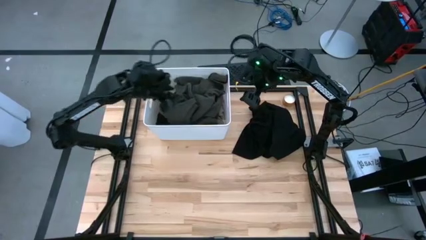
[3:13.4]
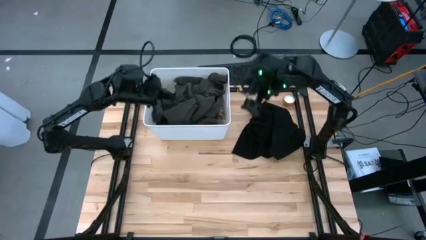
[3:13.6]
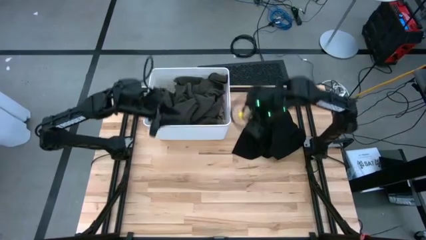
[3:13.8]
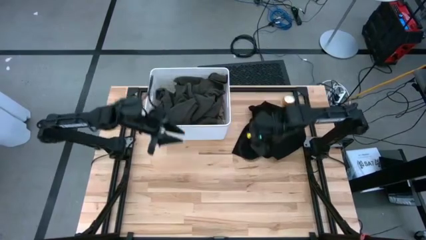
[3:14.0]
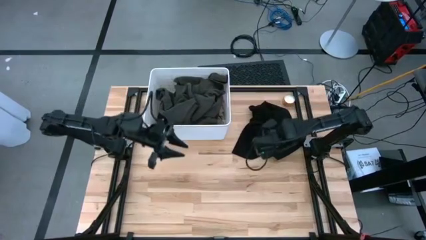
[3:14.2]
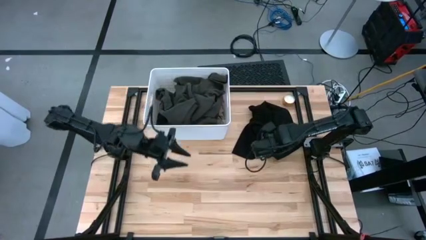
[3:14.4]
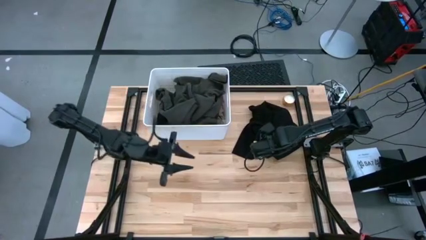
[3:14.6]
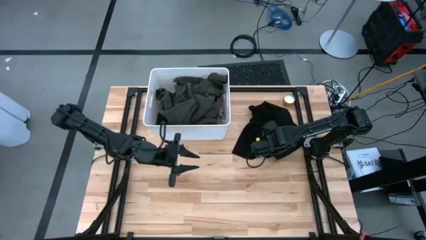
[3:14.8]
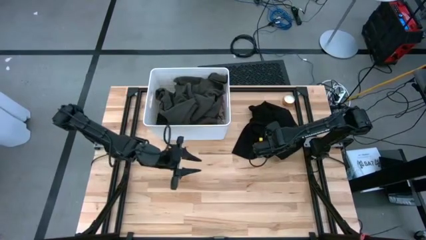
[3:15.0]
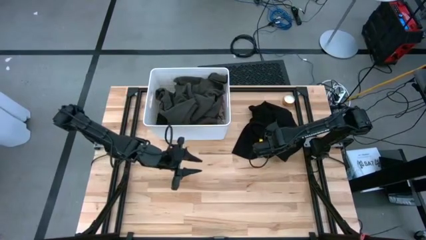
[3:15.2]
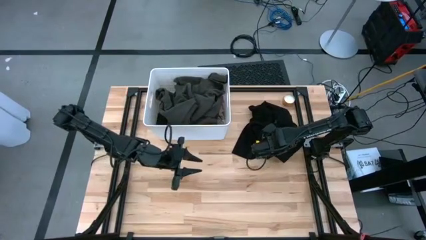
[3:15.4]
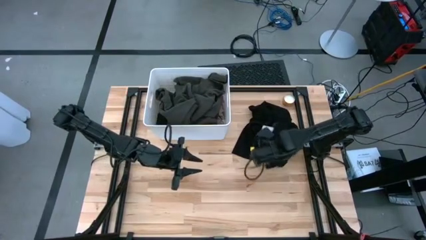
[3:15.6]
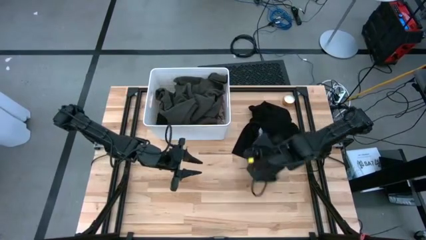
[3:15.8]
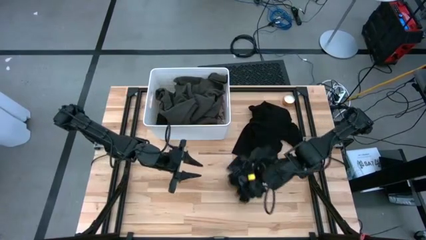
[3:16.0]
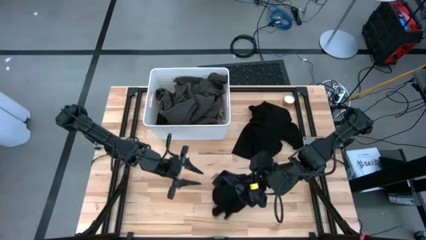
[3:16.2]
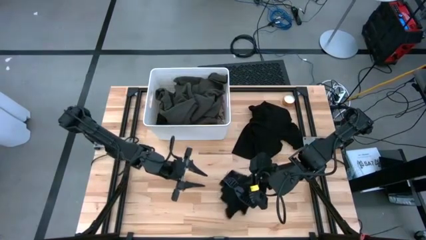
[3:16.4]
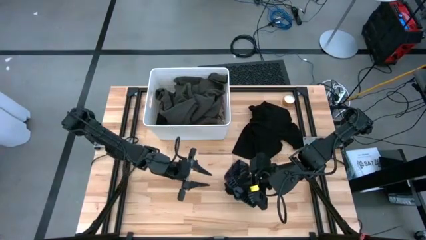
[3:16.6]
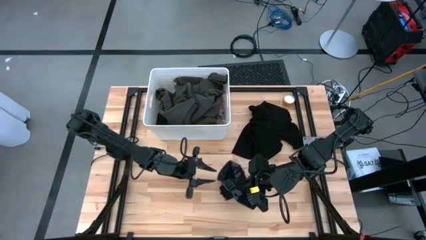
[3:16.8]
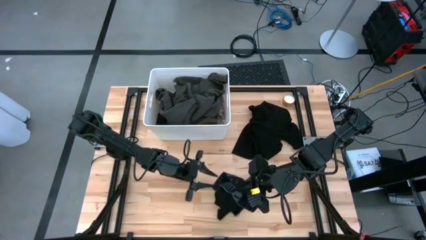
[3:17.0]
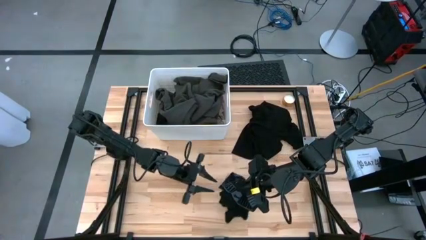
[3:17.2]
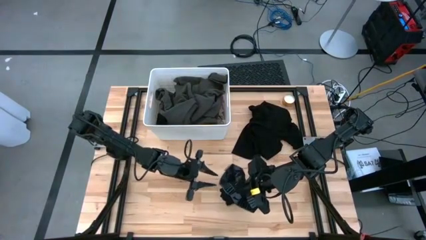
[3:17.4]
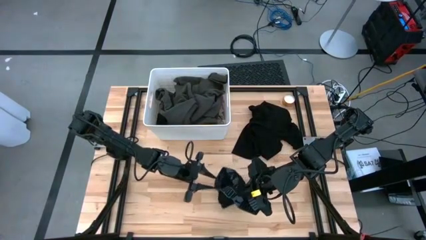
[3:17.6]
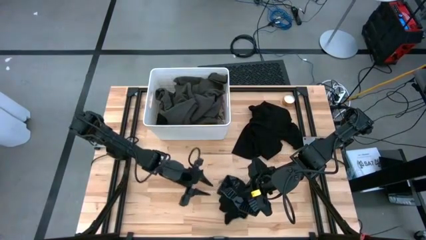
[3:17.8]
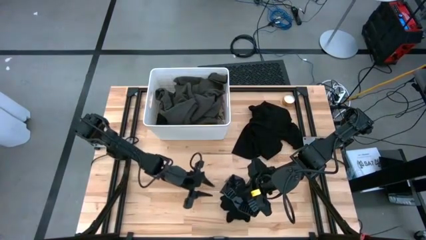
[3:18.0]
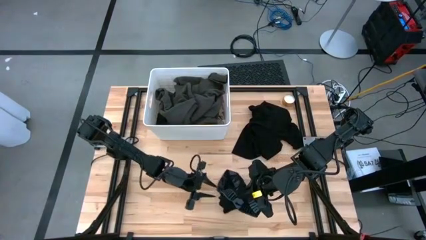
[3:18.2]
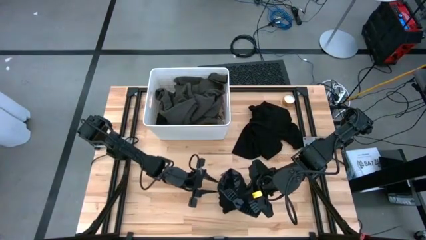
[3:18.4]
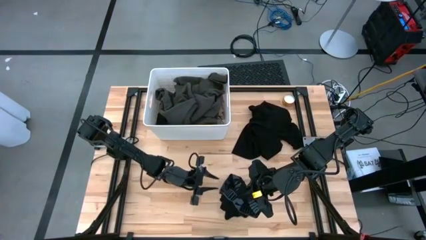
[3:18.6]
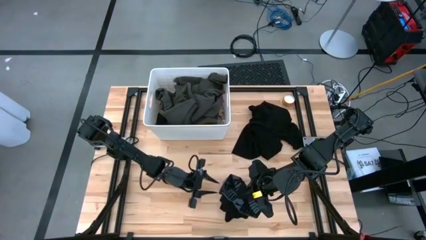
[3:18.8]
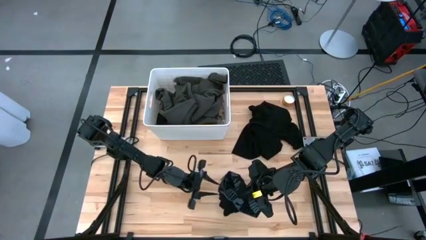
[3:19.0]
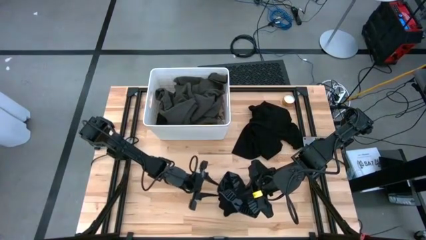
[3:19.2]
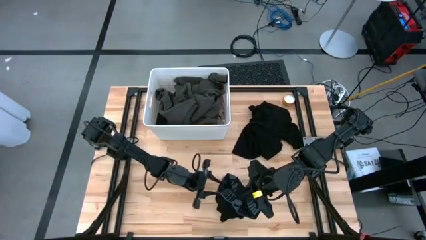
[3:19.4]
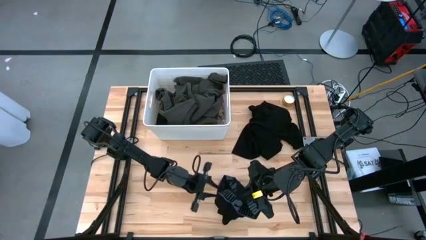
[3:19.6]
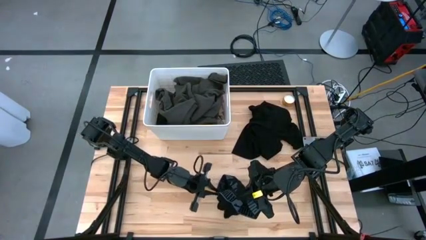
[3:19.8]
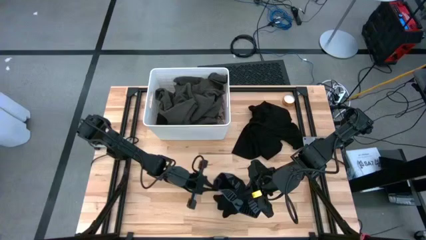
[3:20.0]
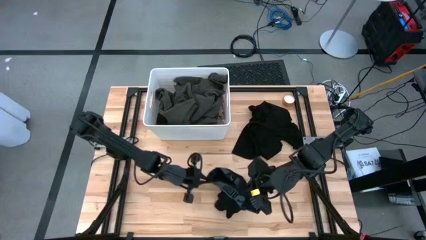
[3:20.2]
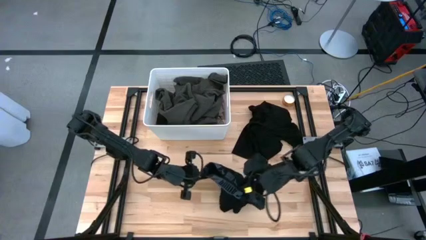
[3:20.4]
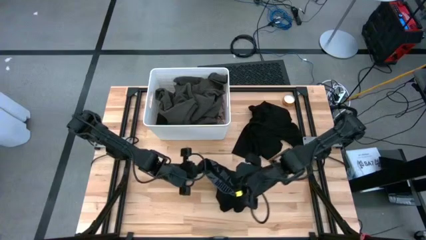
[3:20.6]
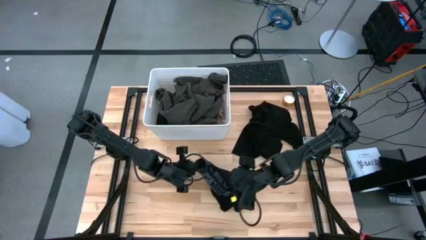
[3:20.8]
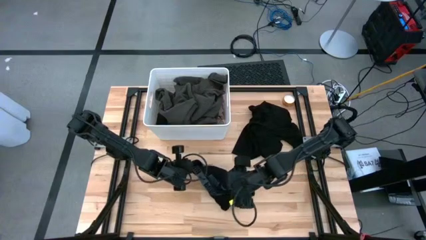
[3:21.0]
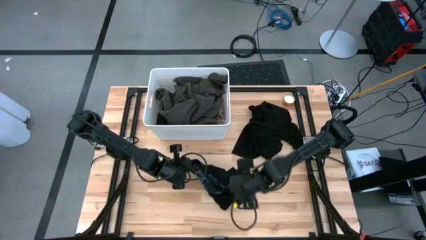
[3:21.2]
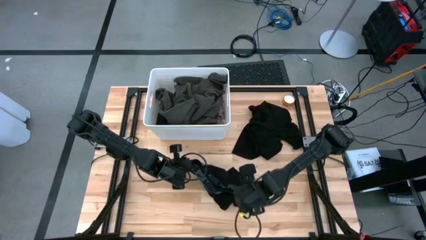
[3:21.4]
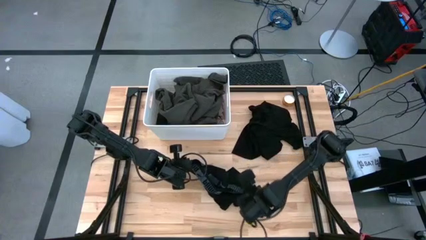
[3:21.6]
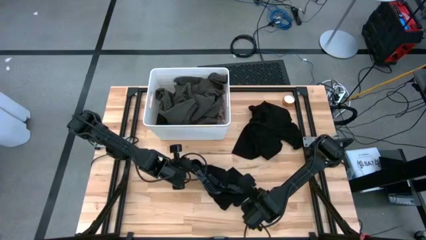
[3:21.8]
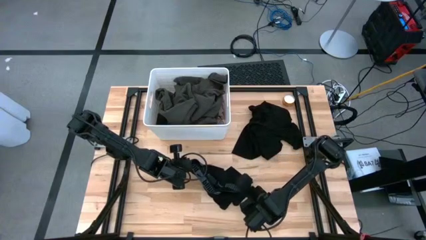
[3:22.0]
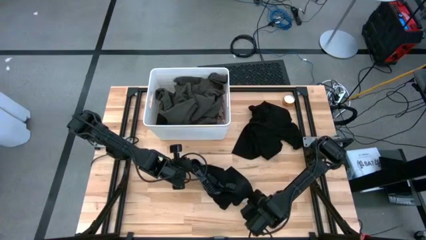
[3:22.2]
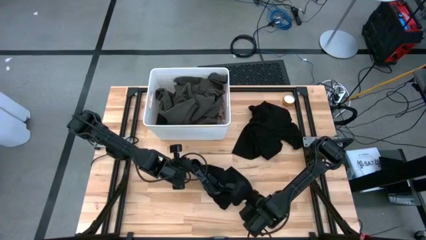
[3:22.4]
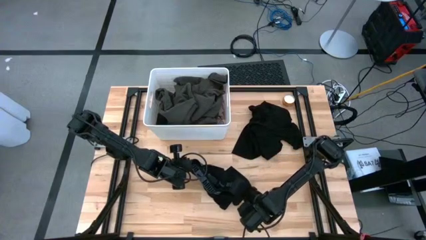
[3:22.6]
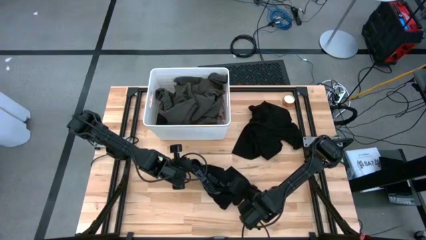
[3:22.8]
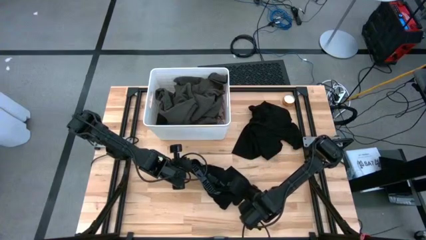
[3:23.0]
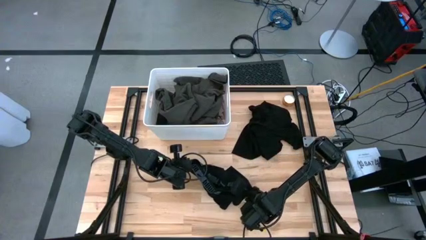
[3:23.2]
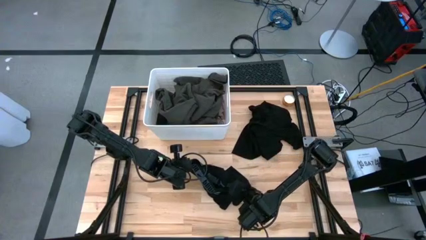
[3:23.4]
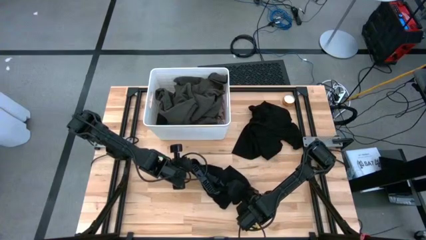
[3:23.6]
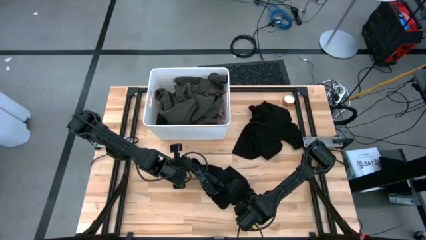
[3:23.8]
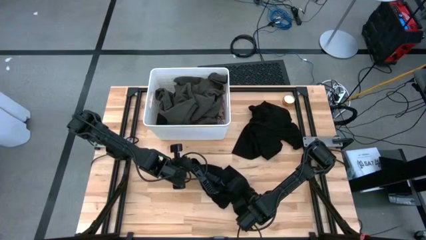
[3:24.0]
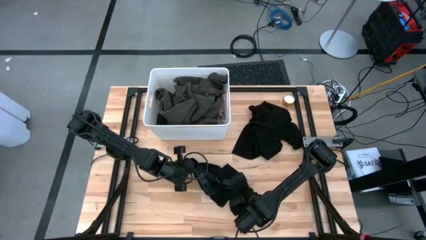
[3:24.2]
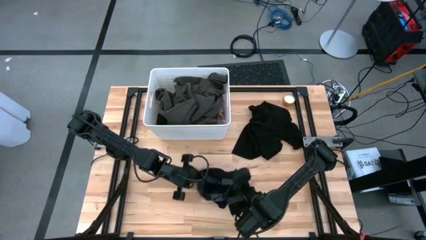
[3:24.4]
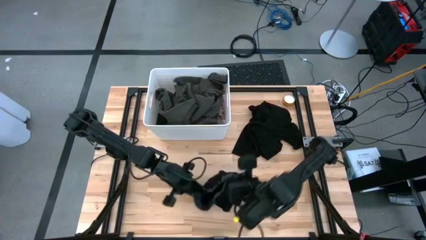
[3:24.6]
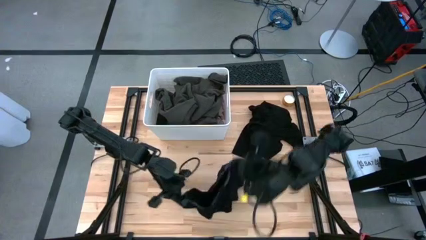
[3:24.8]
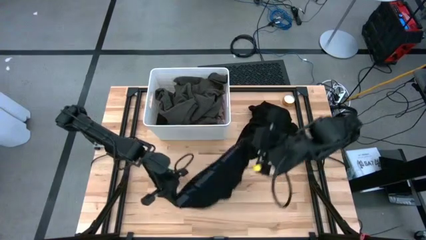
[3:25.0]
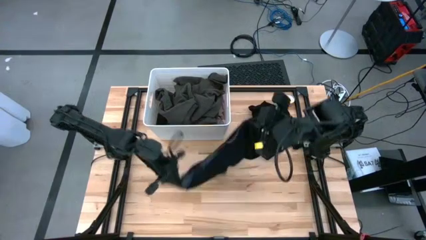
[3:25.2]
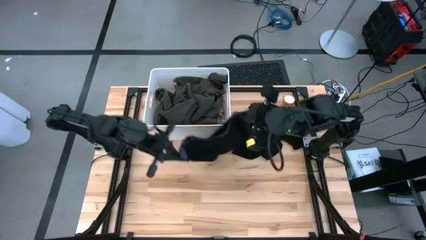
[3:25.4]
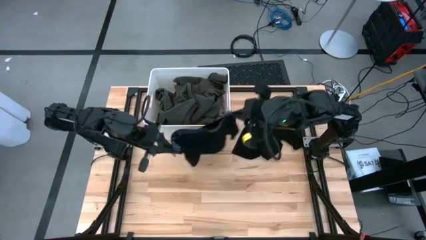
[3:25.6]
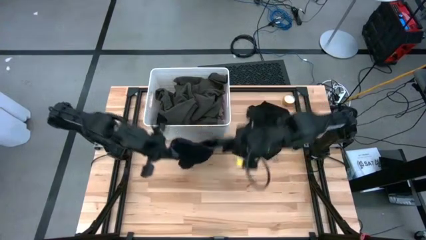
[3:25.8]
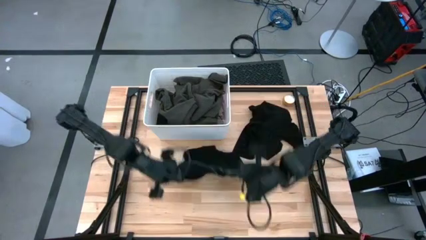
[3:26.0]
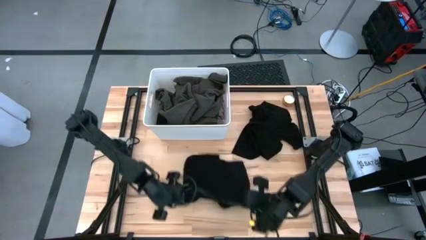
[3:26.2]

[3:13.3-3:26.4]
Task: Sort clothes
Put the black boxer into the white laundry bin

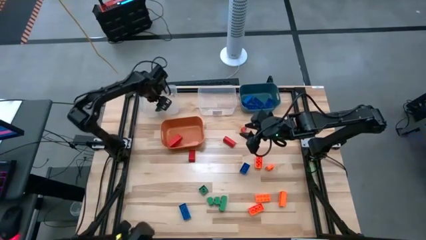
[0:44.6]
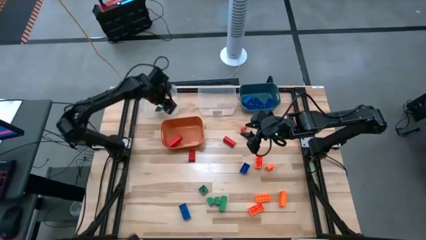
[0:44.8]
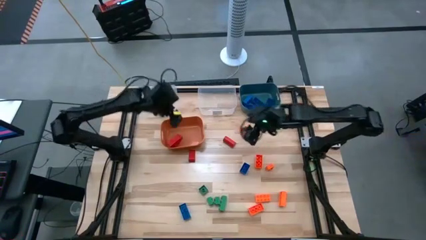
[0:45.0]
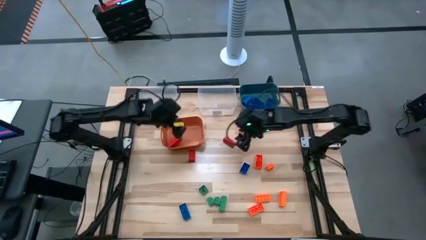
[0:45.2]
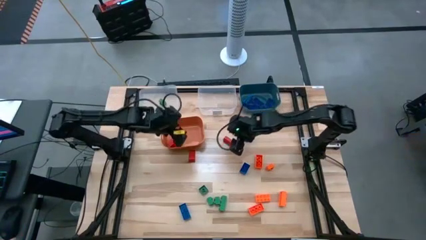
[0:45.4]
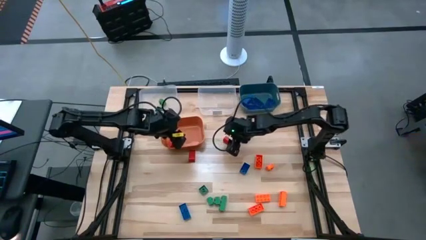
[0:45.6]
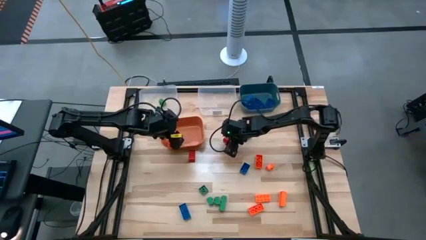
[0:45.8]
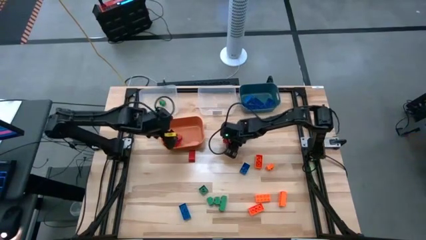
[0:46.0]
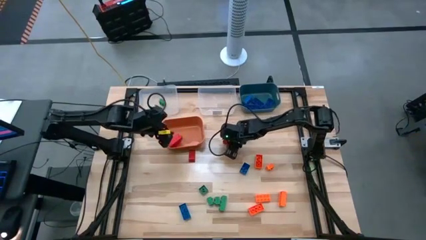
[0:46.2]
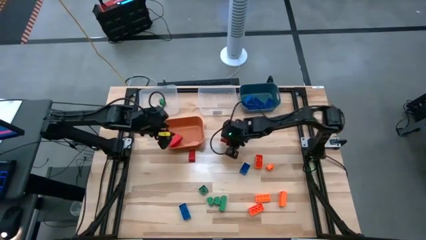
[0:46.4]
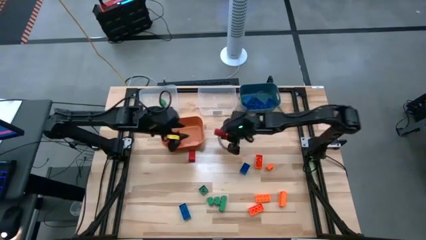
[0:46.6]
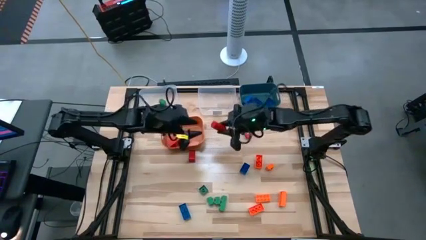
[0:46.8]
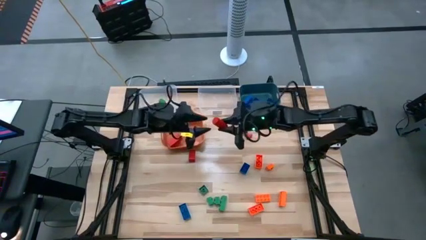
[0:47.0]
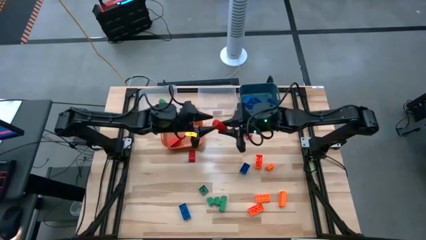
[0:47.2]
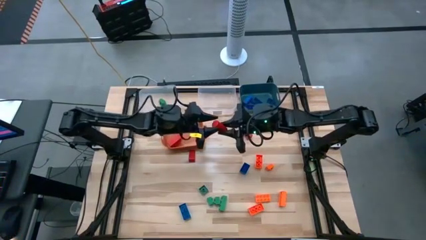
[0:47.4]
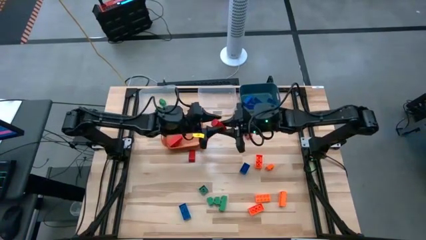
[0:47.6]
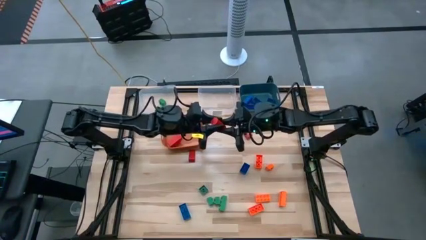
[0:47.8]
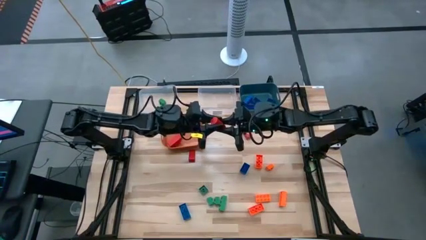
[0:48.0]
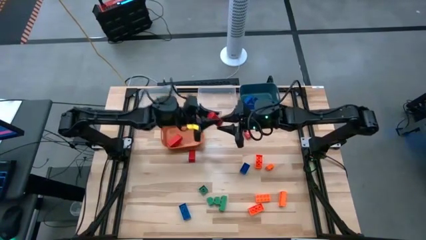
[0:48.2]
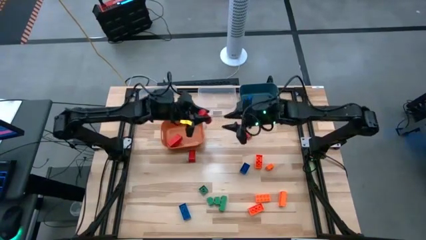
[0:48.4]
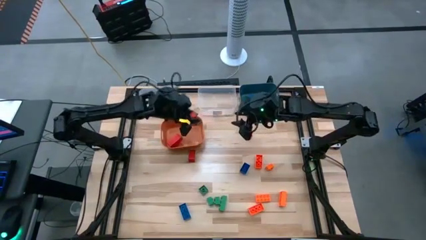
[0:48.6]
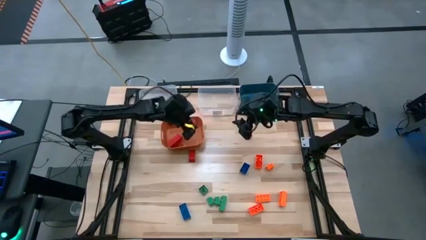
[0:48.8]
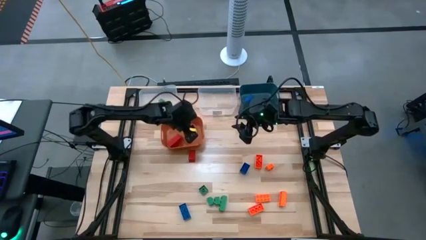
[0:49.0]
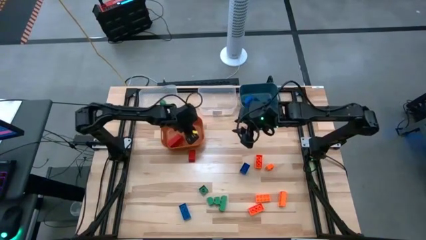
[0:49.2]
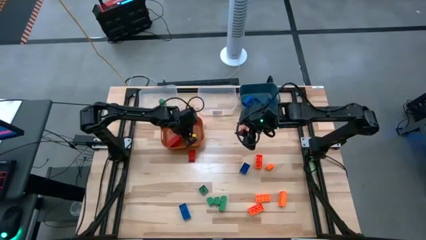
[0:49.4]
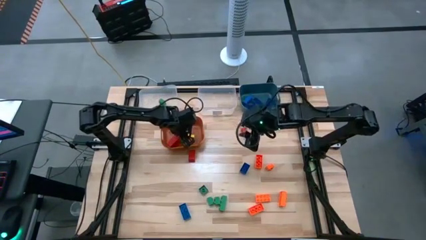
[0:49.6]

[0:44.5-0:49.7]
Task: Sort blocks
Put the red block into the orange bin

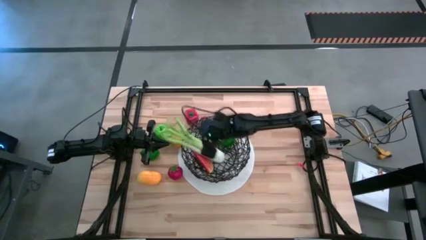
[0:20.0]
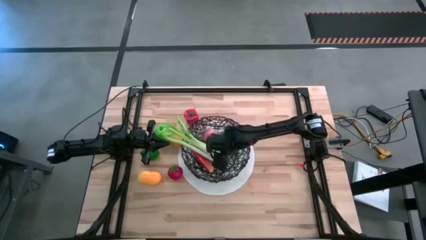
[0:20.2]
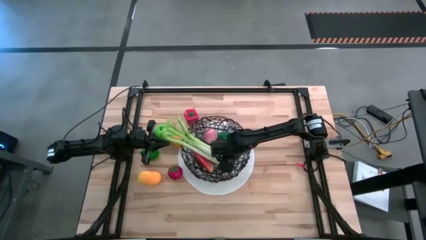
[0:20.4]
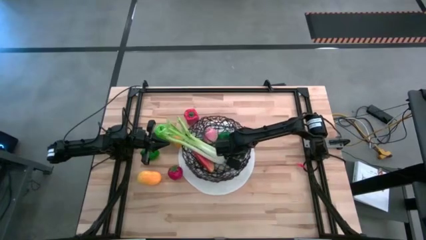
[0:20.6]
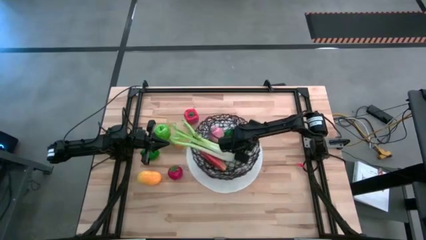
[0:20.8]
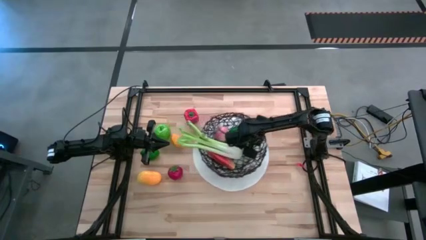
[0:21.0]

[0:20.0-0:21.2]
Task: Build produce basket
Adjust the wire basket
